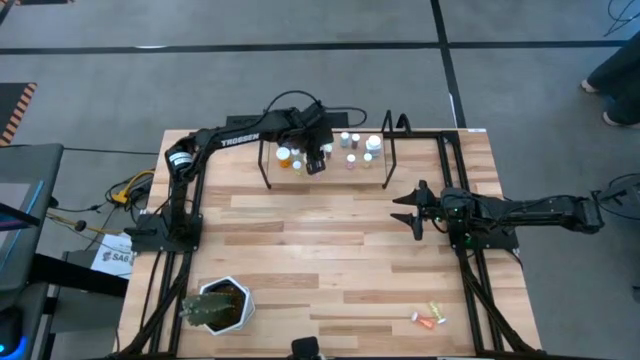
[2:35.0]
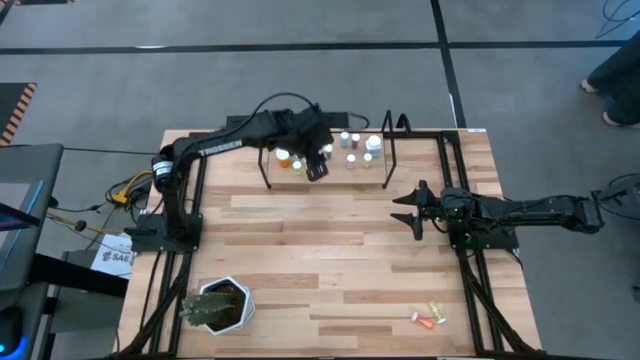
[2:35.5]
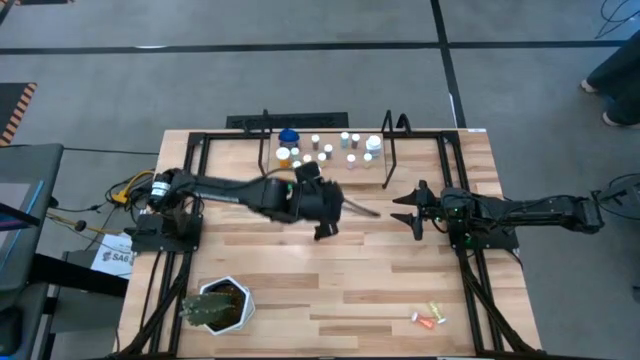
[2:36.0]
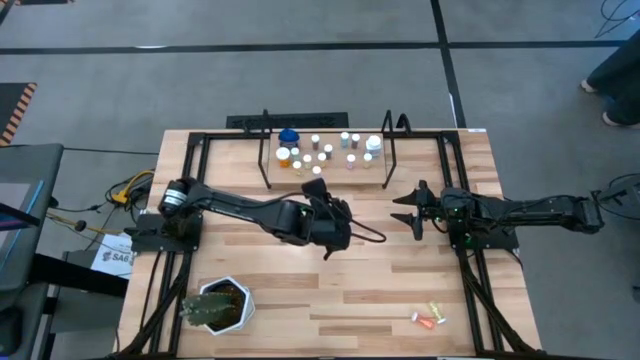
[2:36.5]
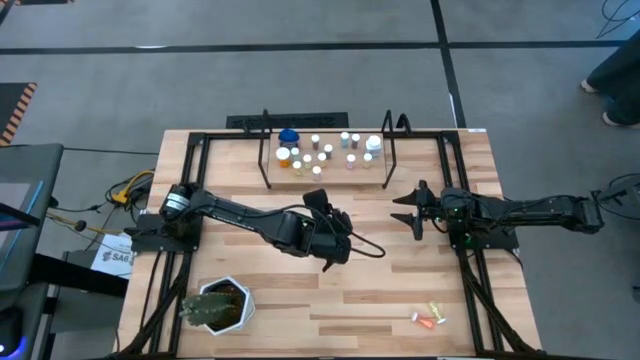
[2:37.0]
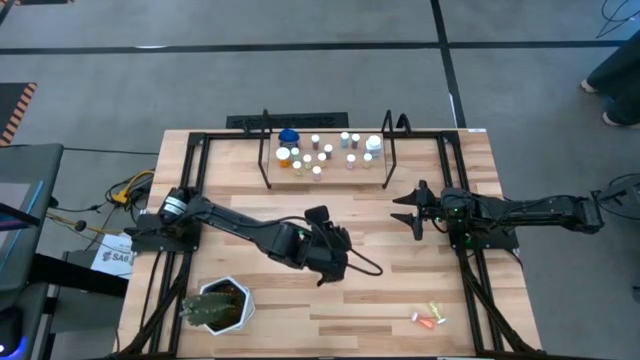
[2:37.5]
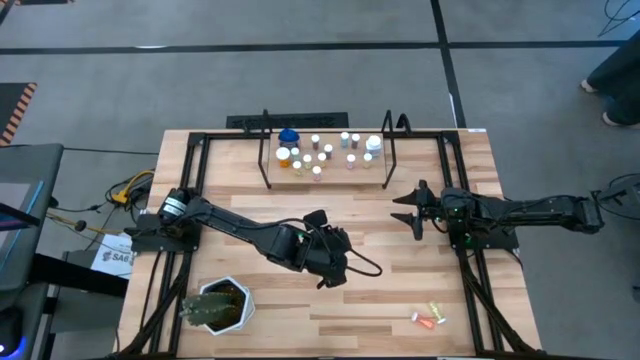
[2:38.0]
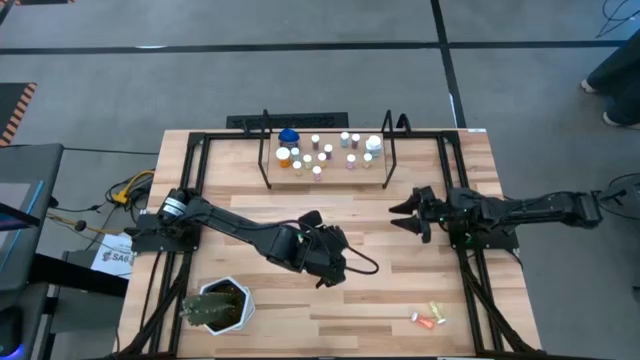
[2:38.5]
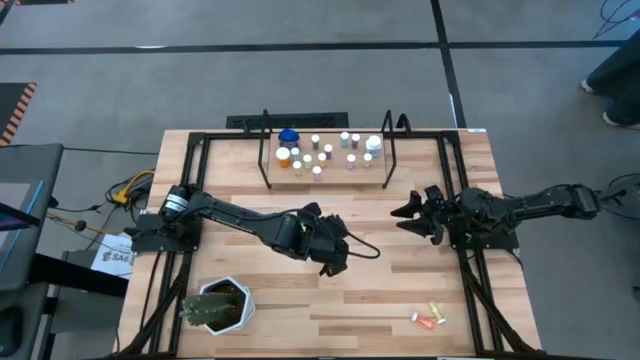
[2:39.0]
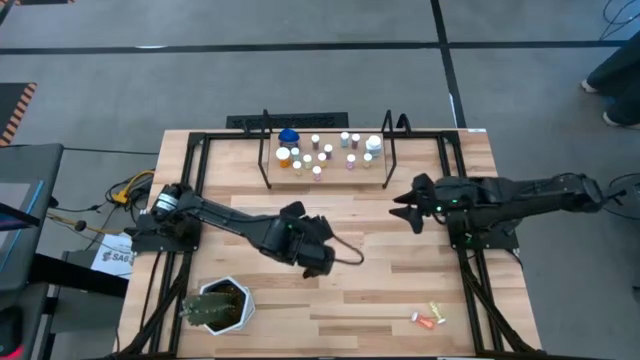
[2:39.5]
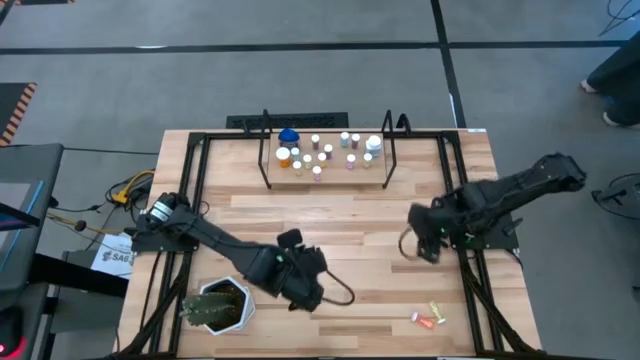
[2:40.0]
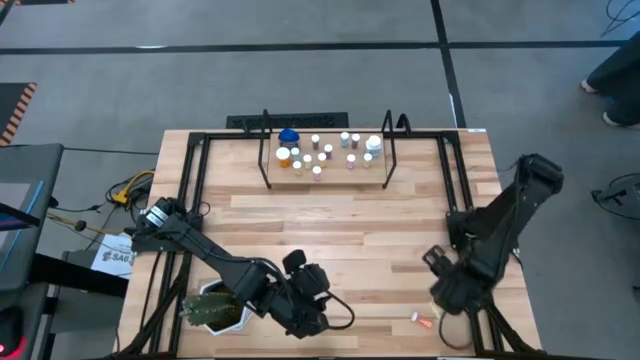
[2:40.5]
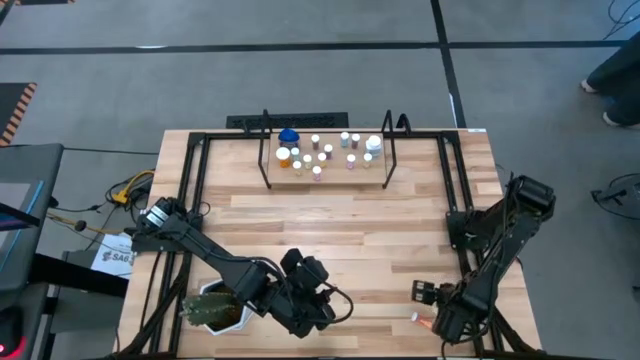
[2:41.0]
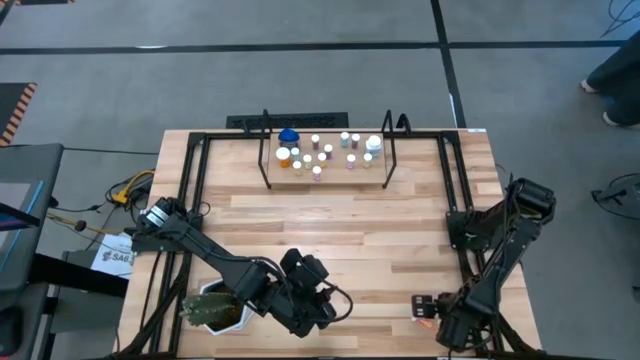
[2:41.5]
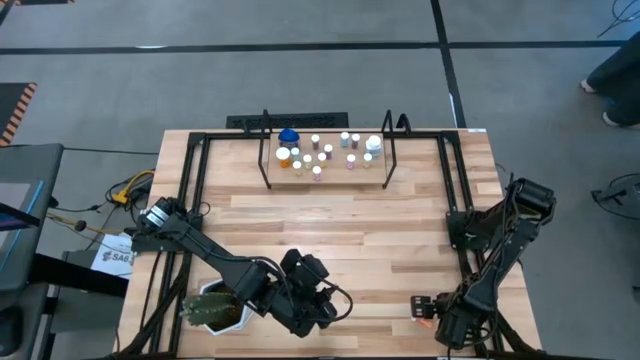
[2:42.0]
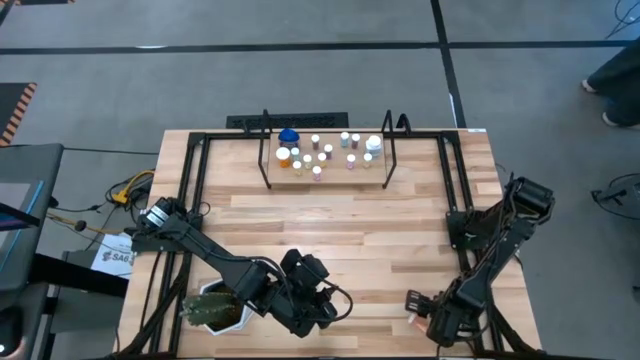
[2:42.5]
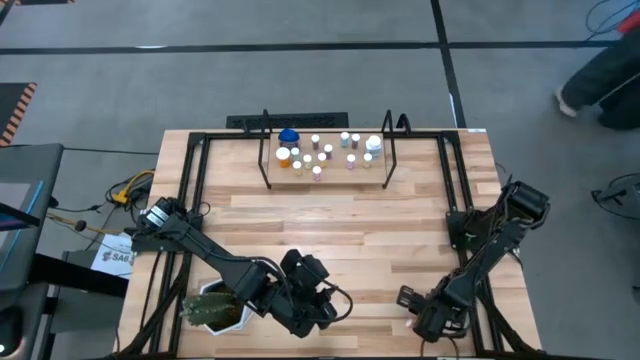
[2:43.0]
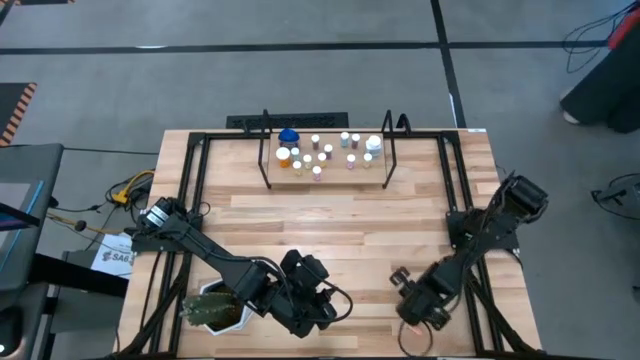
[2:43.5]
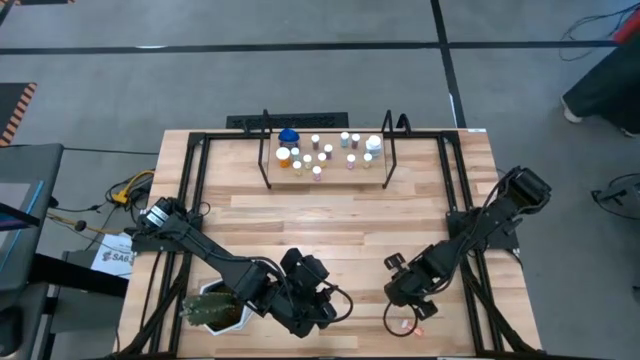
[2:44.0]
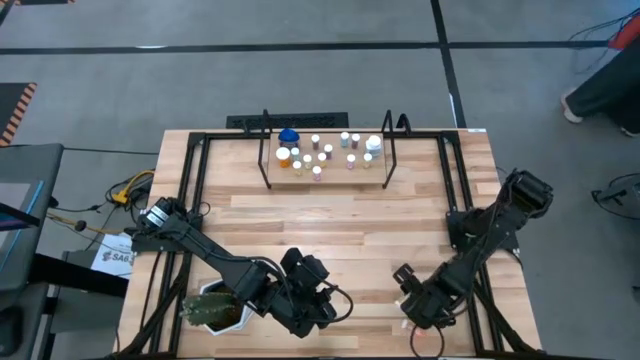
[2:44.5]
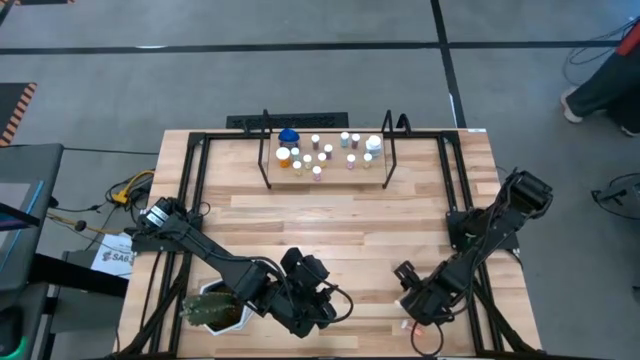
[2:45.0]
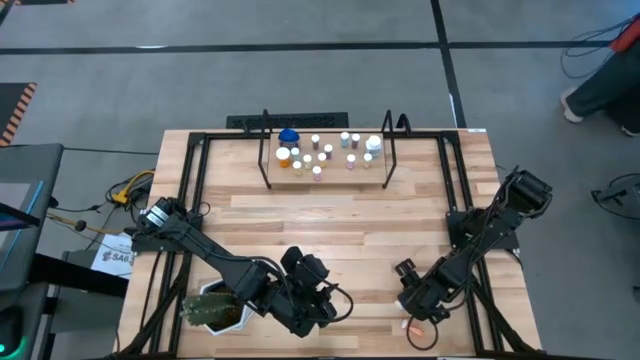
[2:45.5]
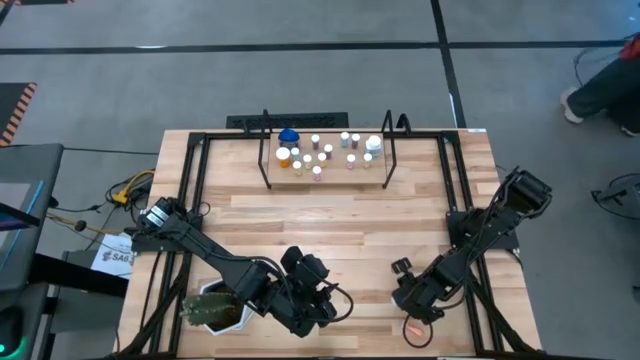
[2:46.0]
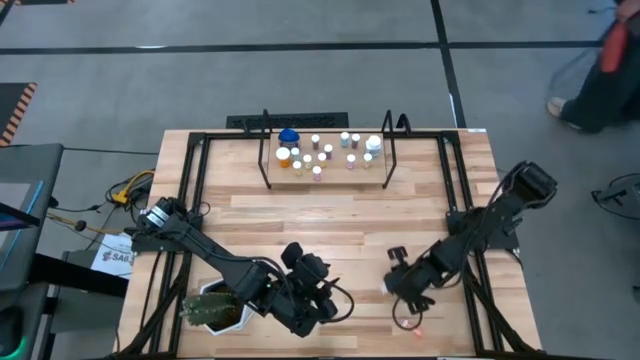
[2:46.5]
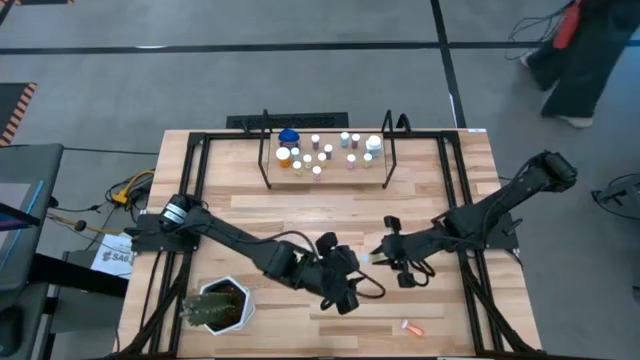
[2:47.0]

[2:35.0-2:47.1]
Task: Pick and place medicine bottles onto shelf by color
Put the yellow pill bottle on the shelf

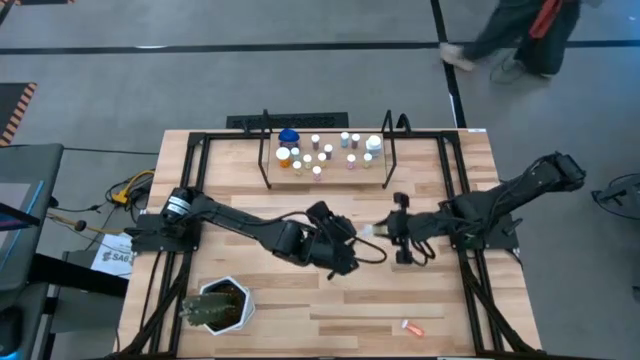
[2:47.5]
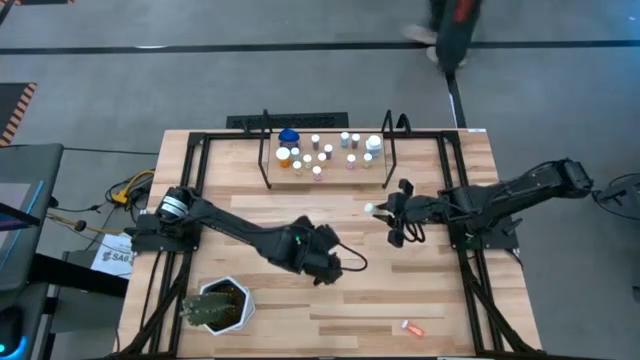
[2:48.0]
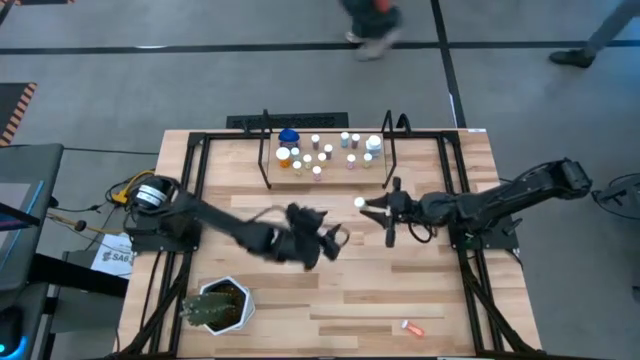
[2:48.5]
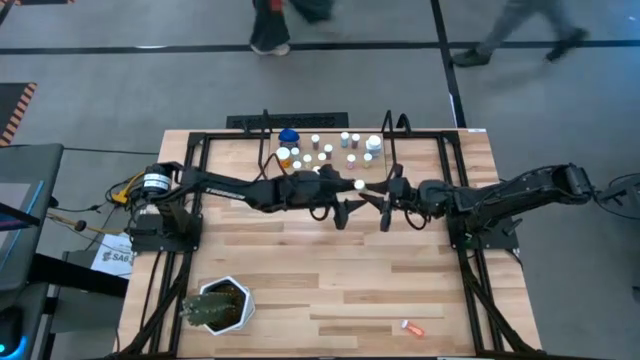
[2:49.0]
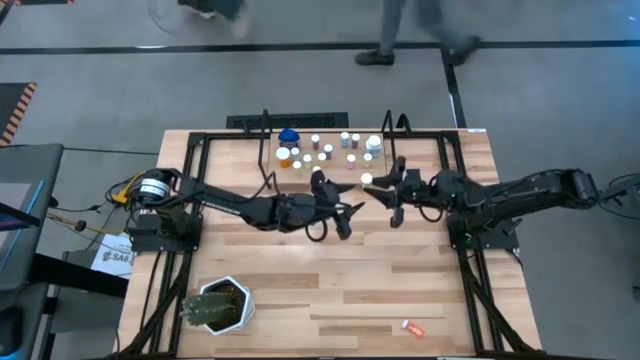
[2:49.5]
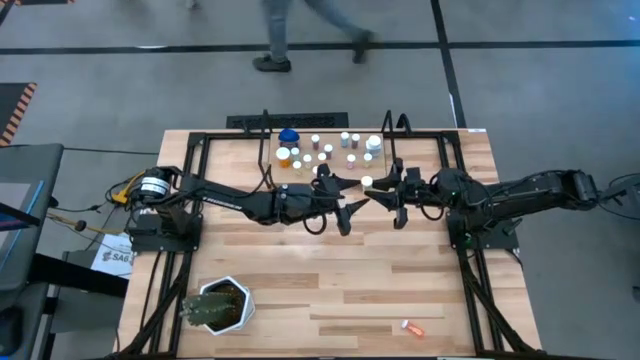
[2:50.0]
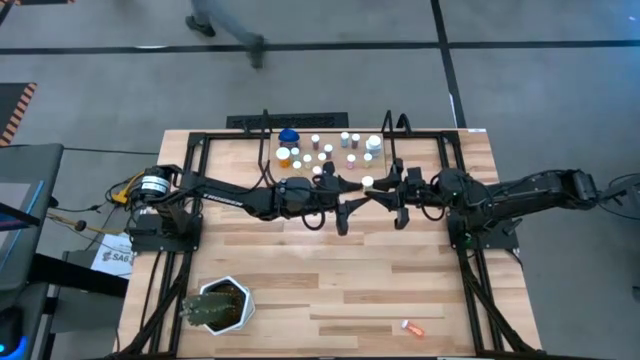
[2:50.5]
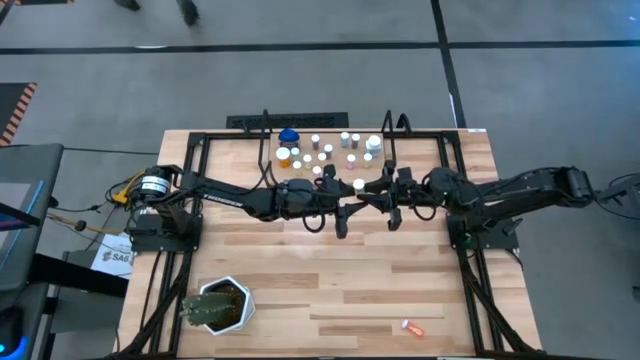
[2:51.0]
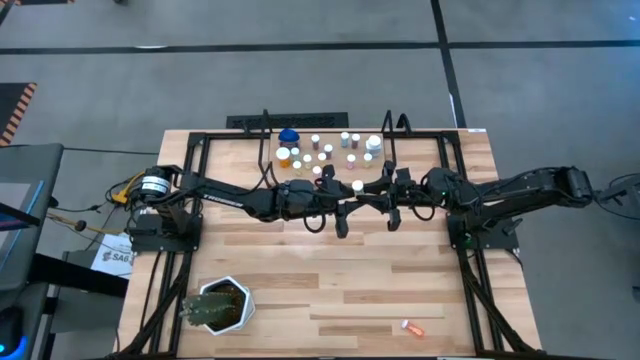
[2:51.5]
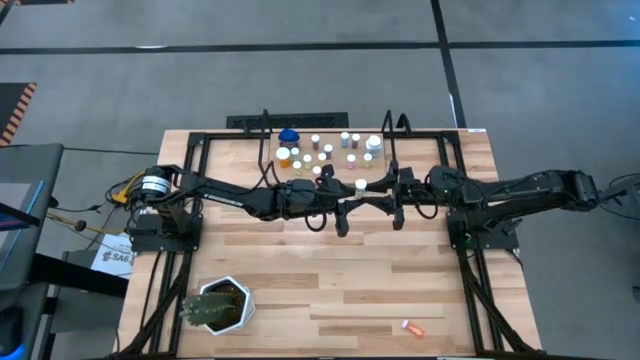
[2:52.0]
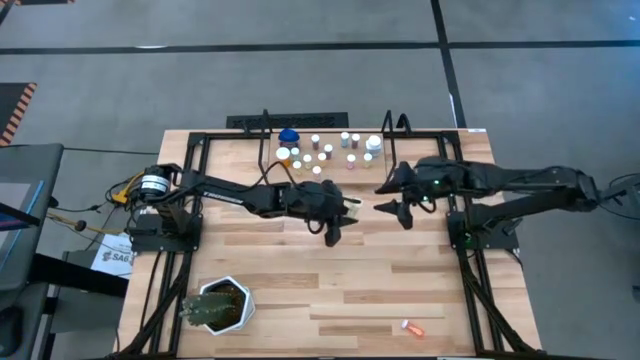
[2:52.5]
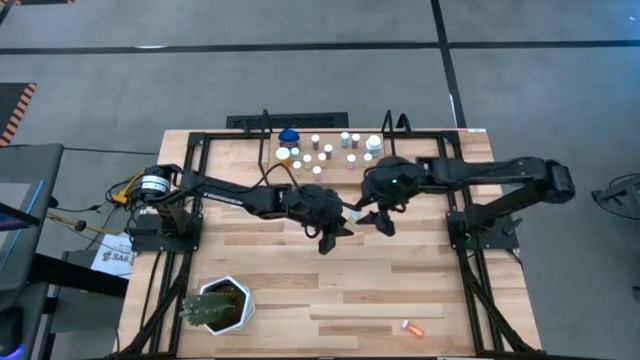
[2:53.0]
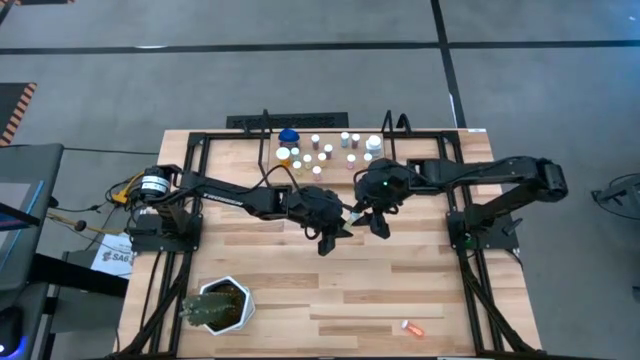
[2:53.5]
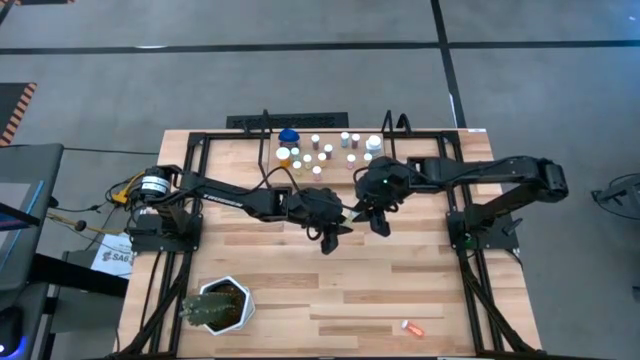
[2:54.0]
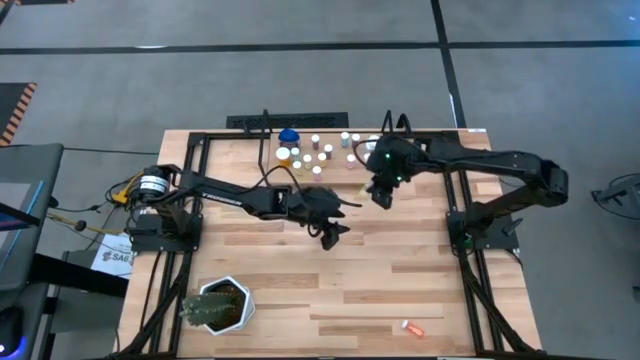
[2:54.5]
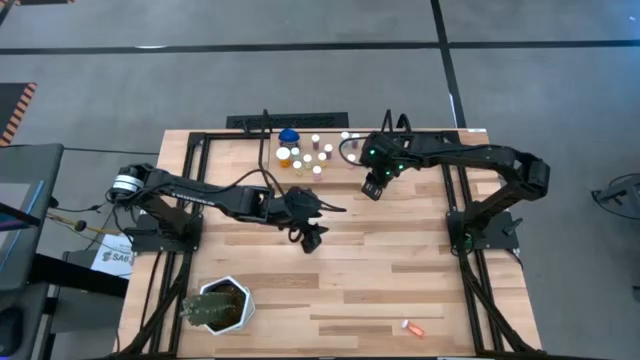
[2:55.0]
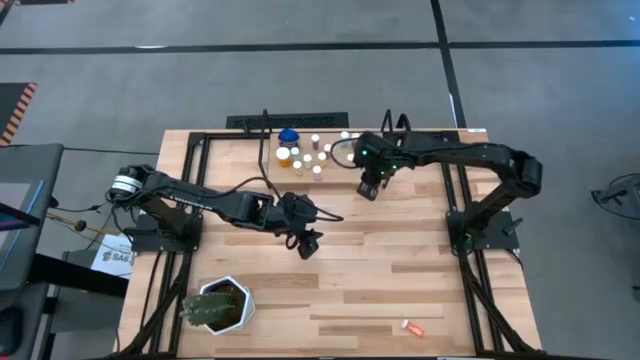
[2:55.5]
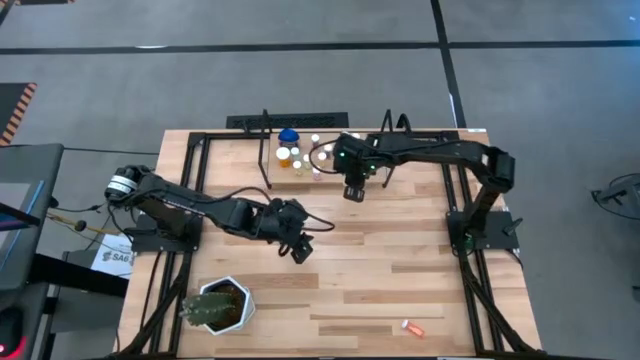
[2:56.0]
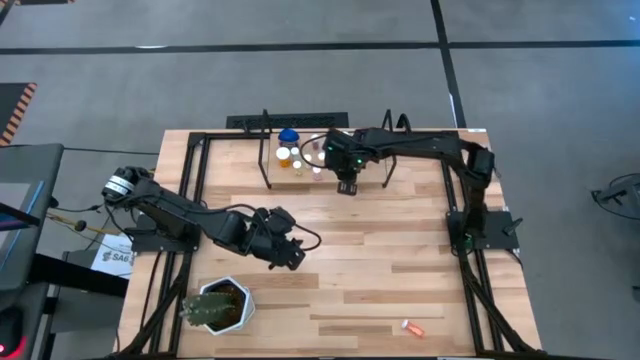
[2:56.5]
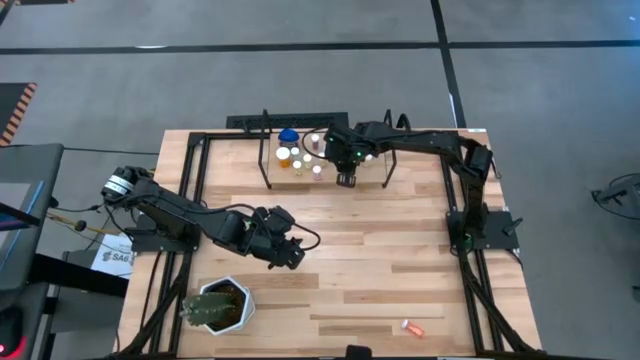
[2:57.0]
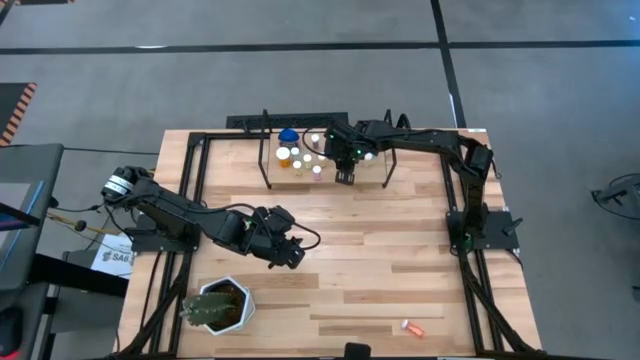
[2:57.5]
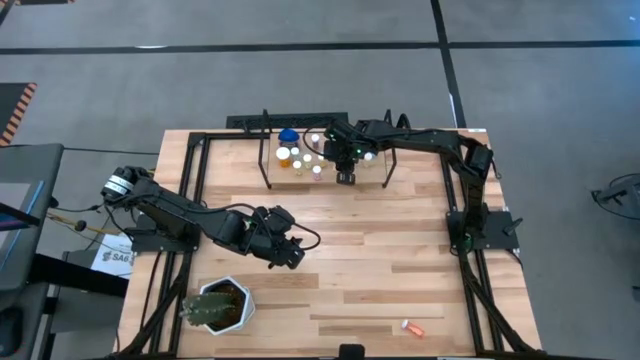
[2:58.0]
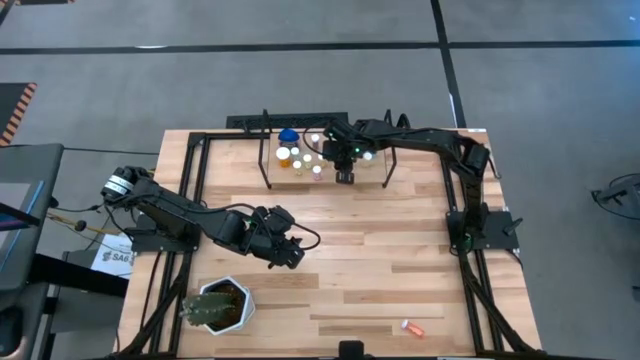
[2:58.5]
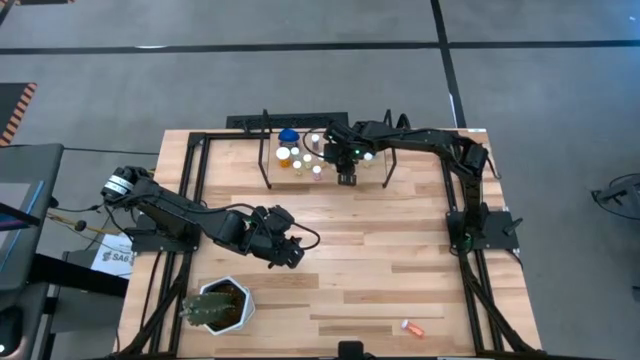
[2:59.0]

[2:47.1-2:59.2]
Put the yellow pill bottle on the shelf
